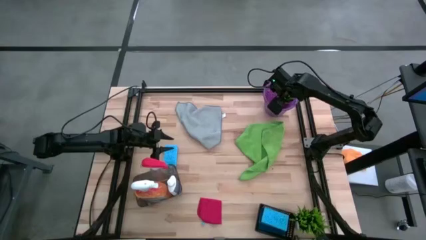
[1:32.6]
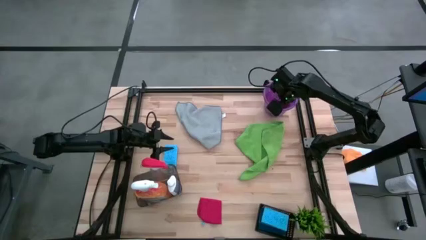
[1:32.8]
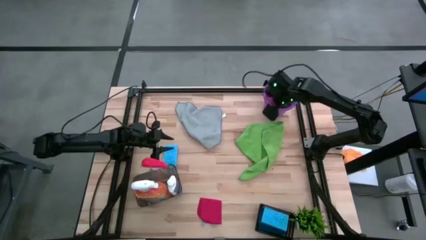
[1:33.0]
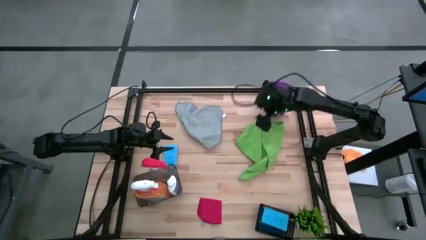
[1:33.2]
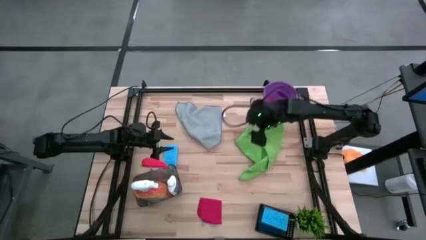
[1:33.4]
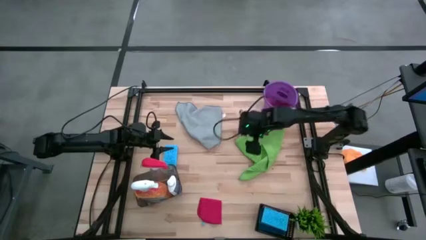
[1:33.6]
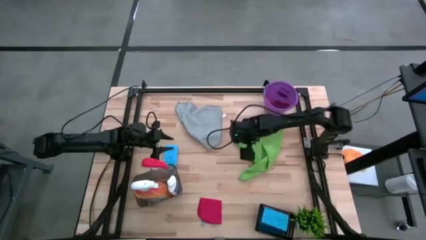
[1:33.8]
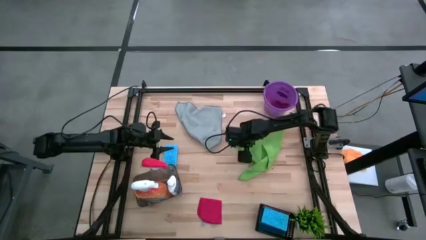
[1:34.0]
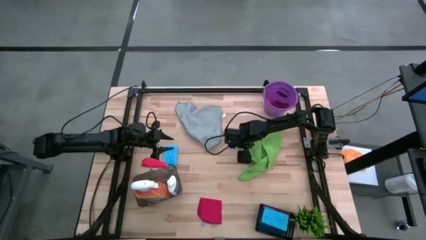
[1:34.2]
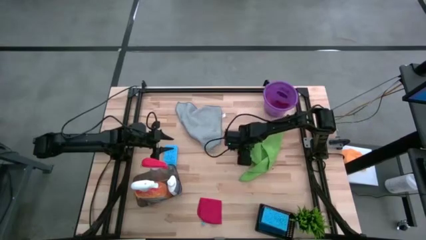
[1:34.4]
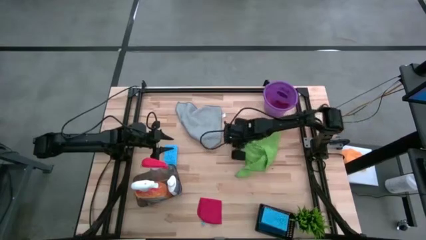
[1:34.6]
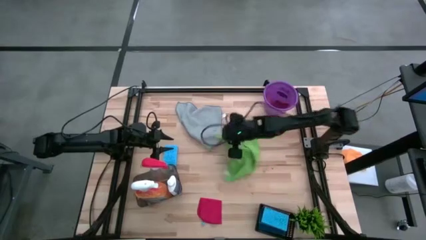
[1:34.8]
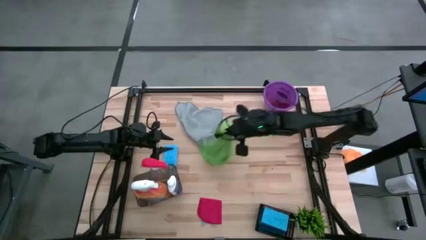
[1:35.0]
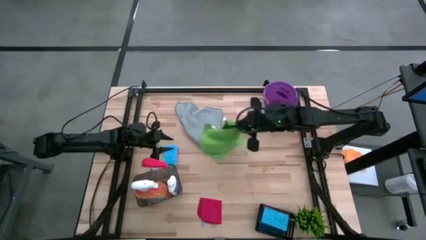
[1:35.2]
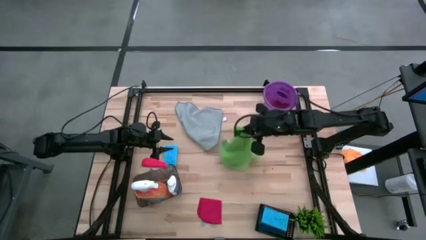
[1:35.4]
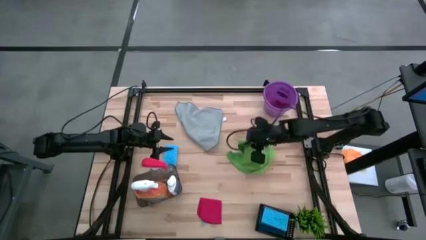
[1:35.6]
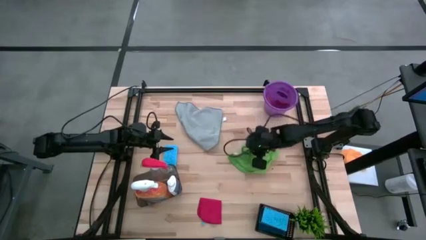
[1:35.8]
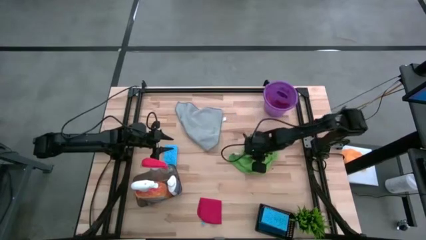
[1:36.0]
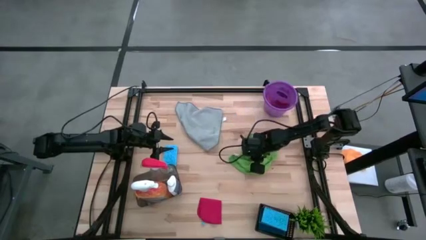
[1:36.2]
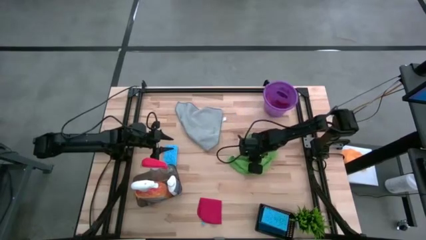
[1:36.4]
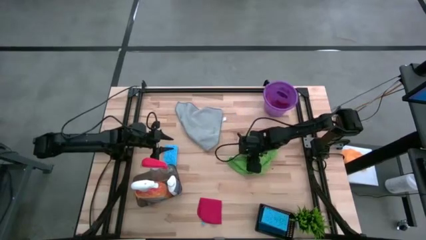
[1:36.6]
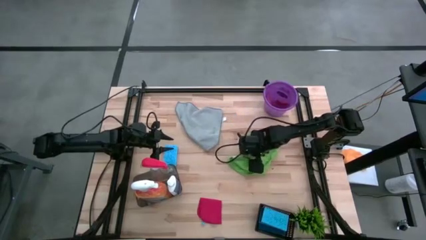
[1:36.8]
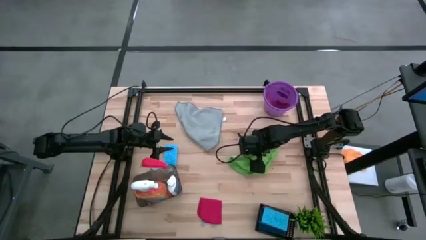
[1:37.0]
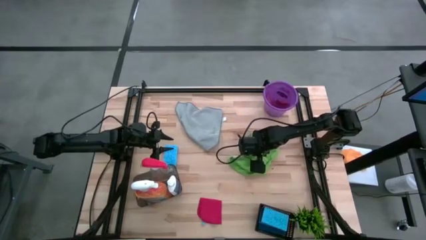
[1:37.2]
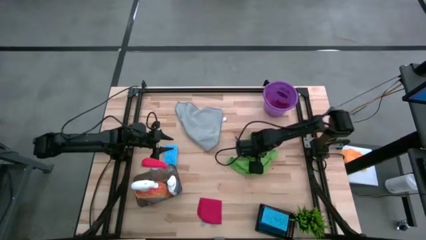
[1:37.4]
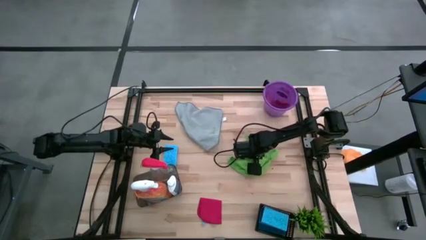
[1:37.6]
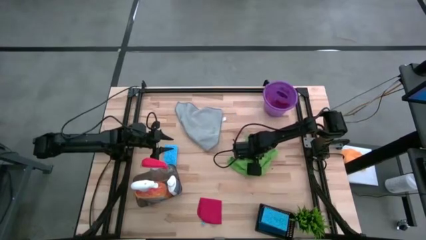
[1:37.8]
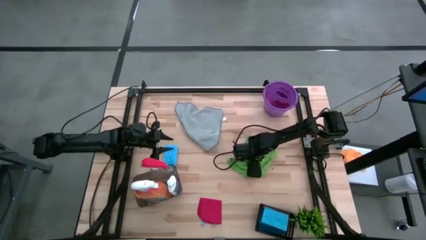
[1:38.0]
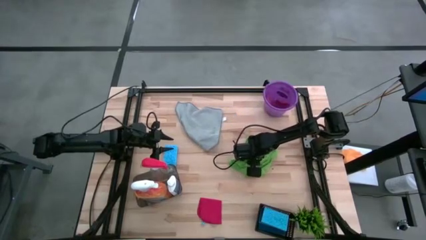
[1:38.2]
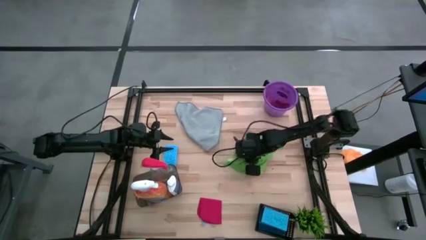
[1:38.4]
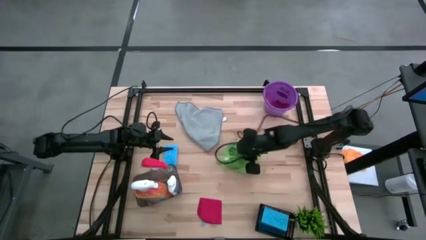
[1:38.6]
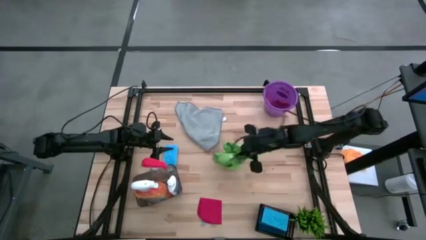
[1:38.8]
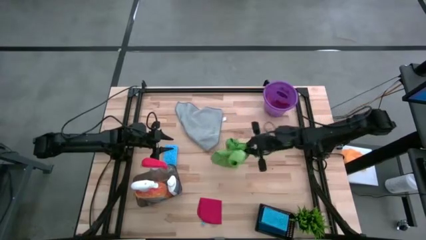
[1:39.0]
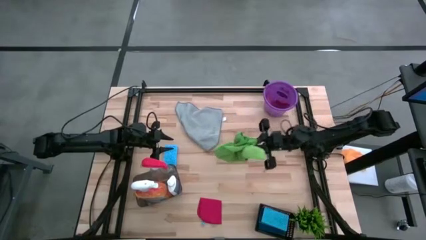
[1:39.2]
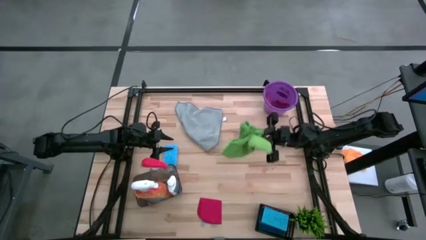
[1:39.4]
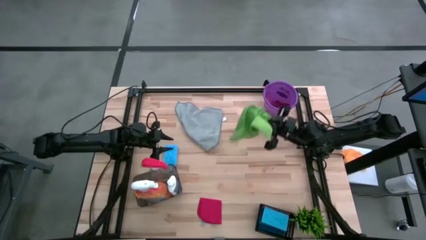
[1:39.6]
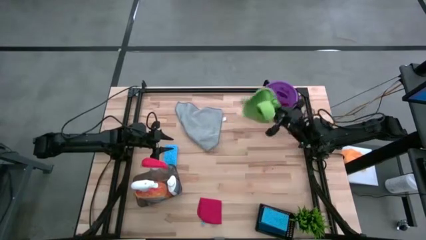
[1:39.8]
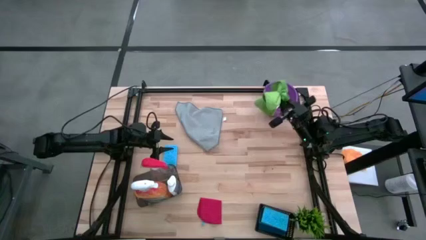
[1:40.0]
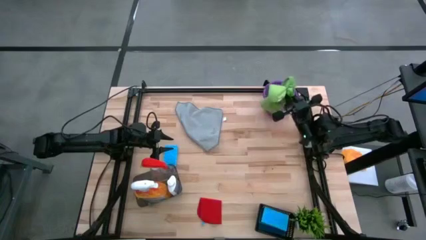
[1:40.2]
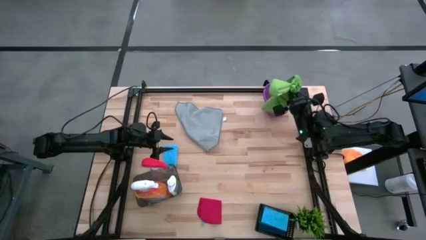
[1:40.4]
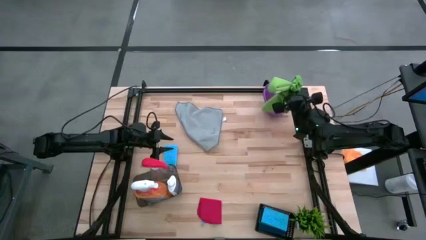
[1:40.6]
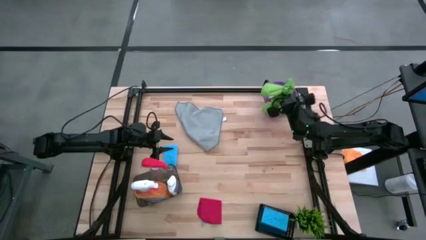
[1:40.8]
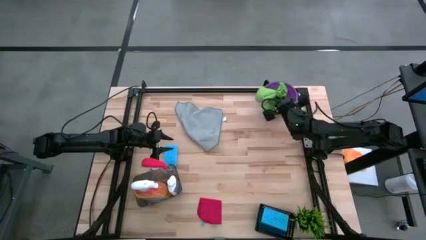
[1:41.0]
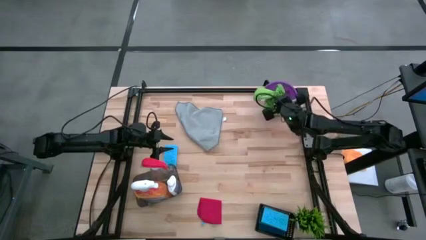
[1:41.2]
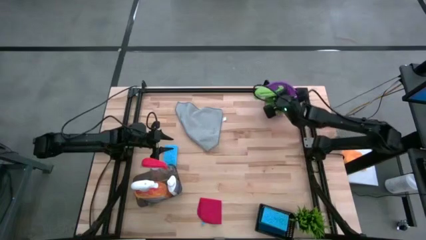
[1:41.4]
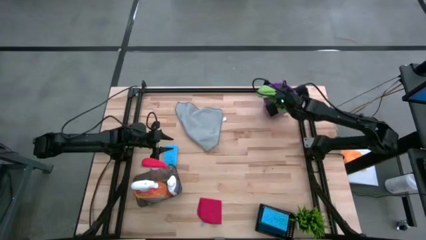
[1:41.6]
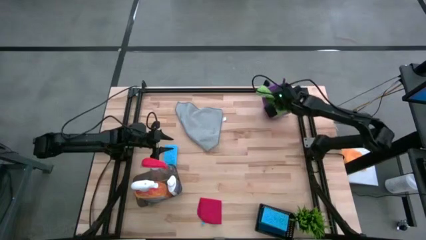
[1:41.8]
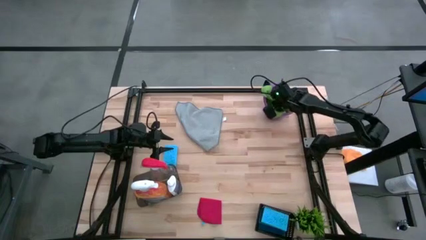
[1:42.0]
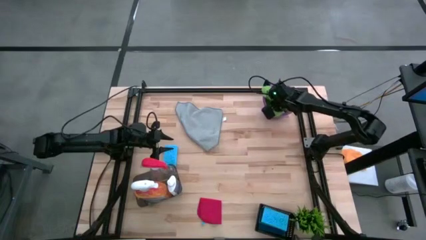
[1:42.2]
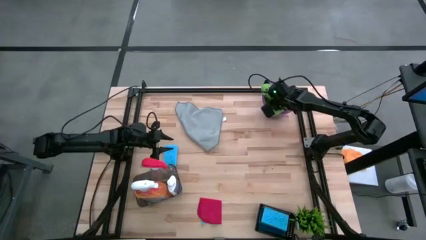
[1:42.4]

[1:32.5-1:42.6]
Task: Pick & Place Kitchen Items
Put the green microfiber towel into the purple bucket
